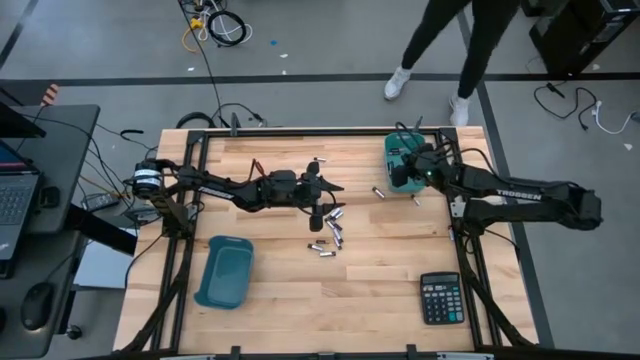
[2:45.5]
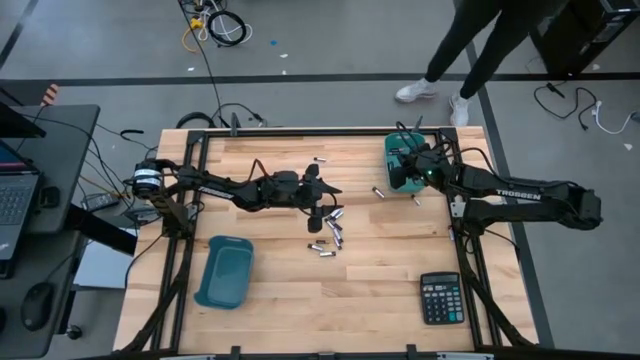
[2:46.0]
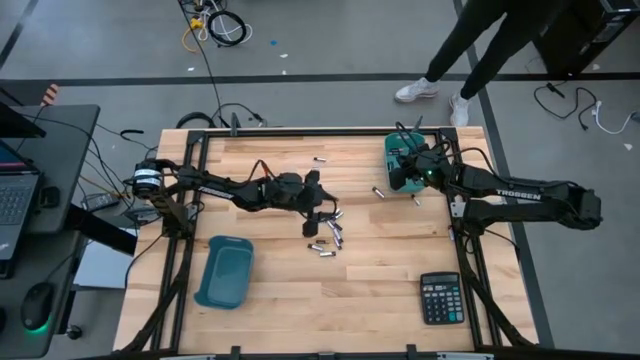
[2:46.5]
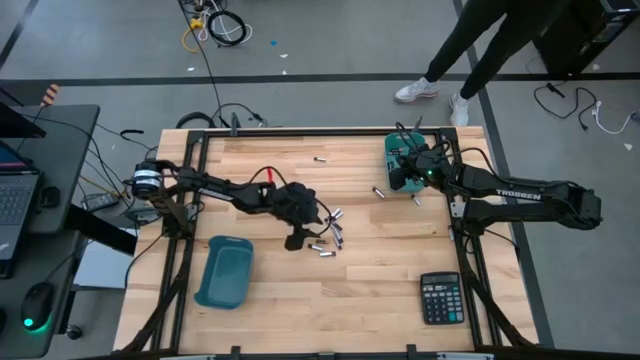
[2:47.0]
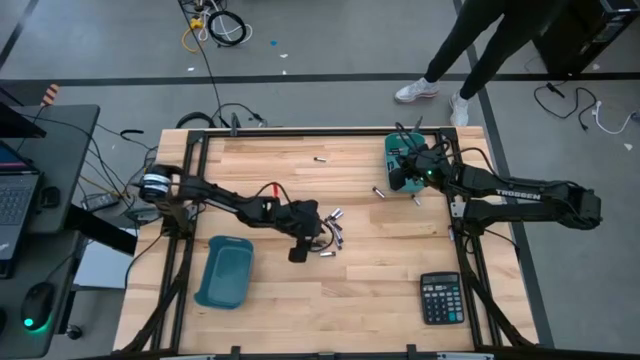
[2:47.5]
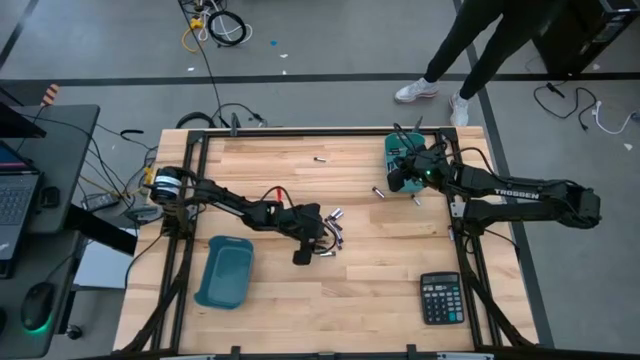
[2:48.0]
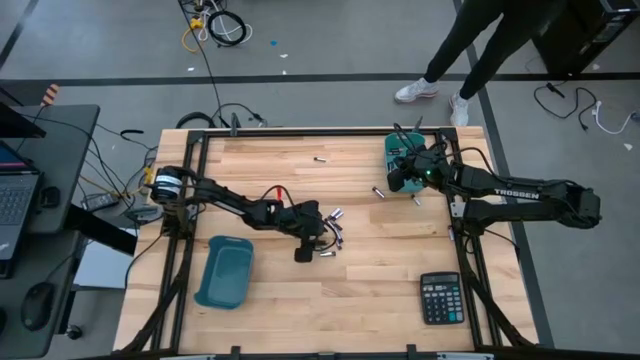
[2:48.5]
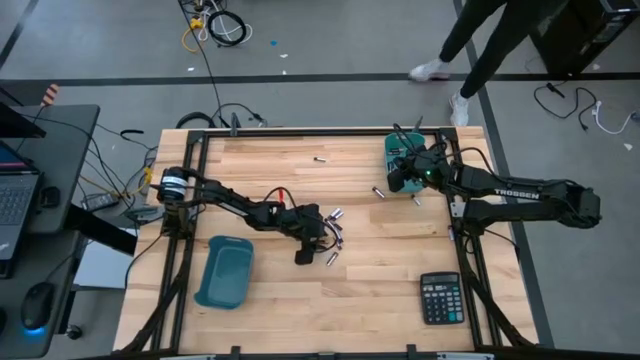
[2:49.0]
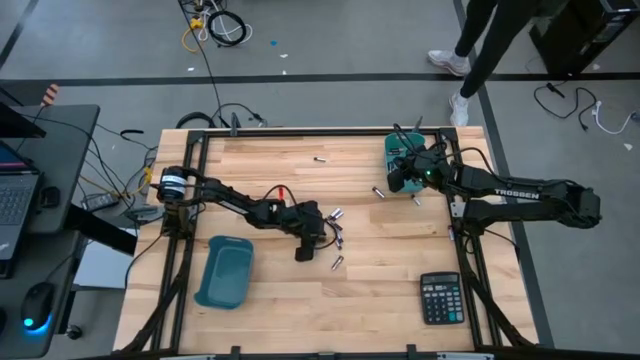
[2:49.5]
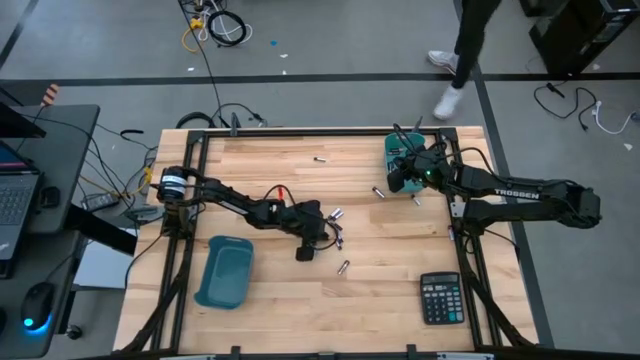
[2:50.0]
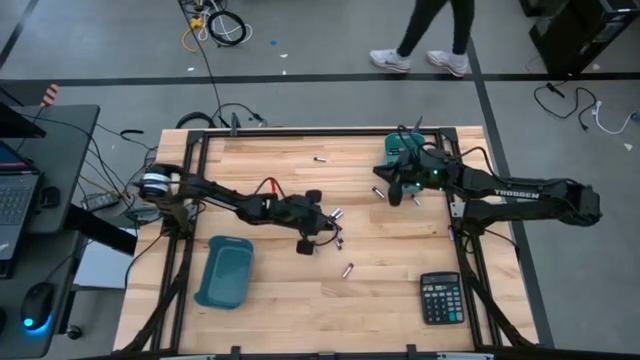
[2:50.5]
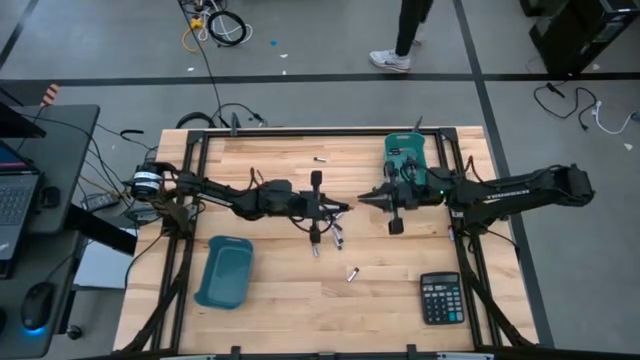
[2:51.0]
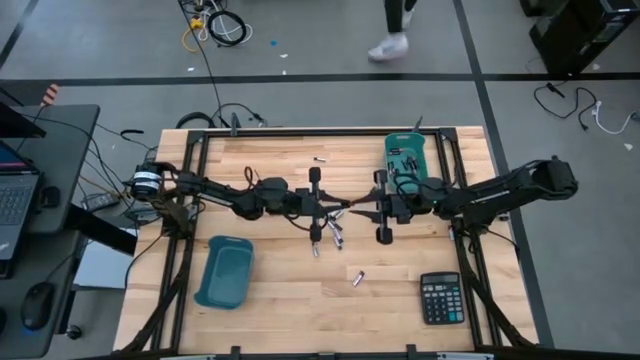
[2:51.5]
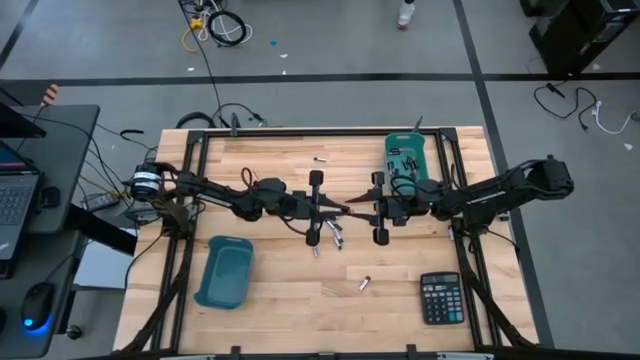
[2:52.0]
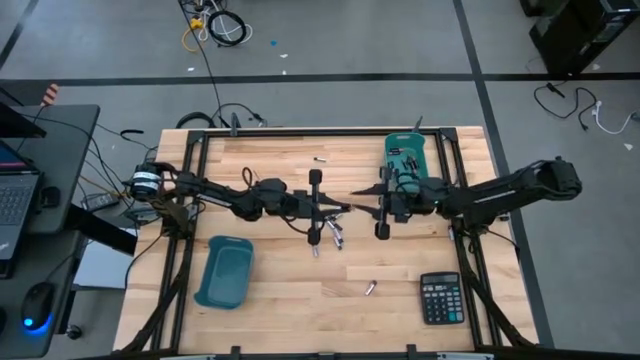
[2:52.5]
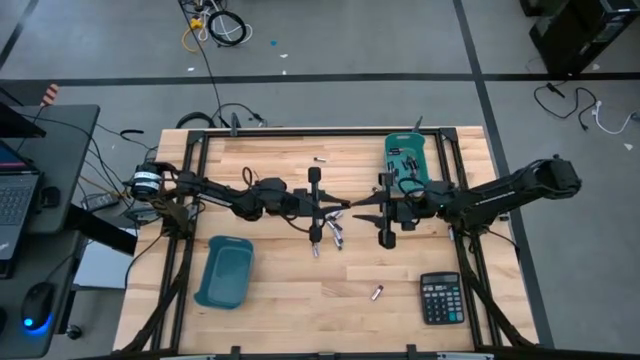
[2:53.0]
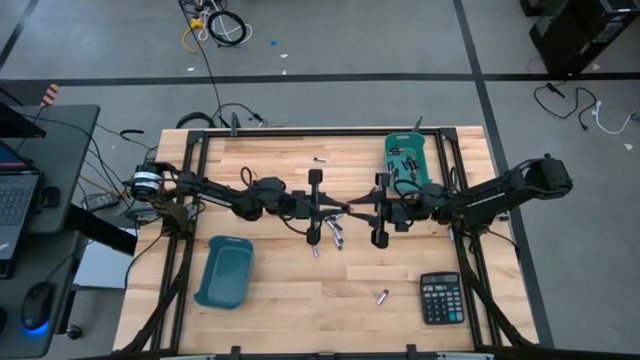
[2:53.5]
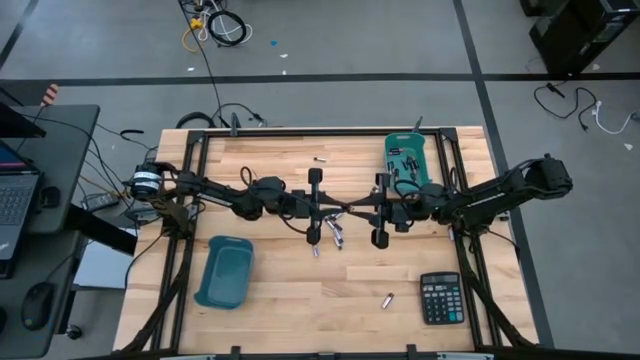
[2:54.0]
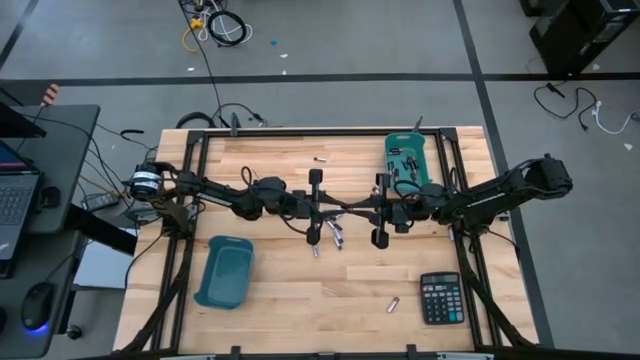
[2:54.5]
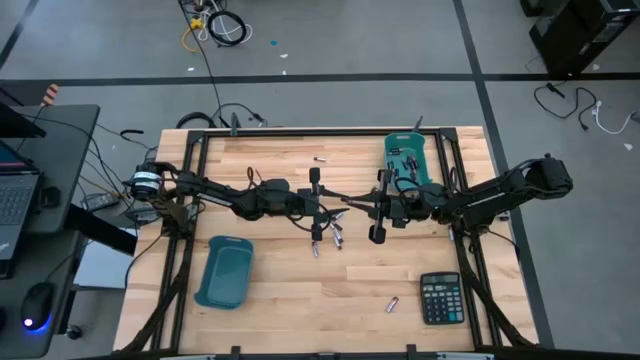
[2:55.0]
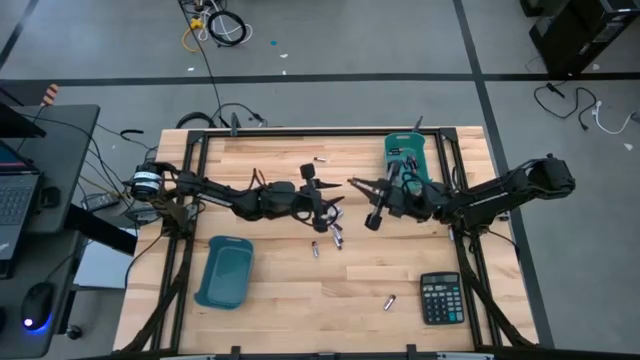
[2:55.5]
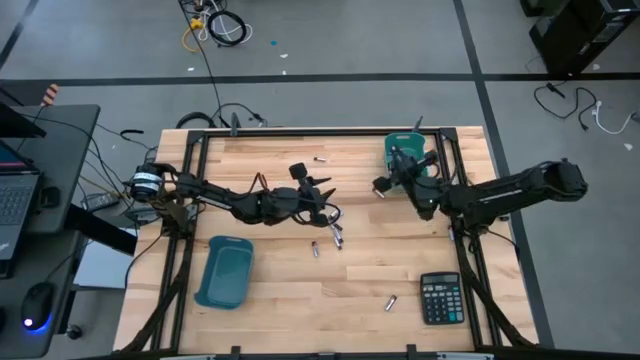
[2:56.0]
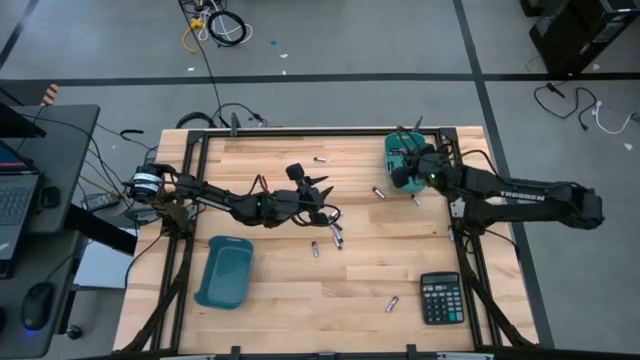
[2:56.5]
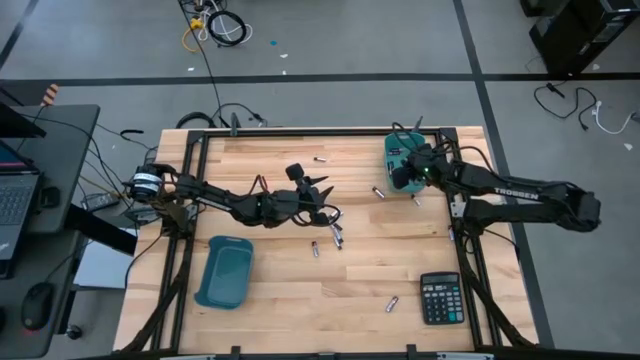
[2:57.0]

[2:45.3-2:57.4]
Task: Sort batteries
Put the black battery into the green bin

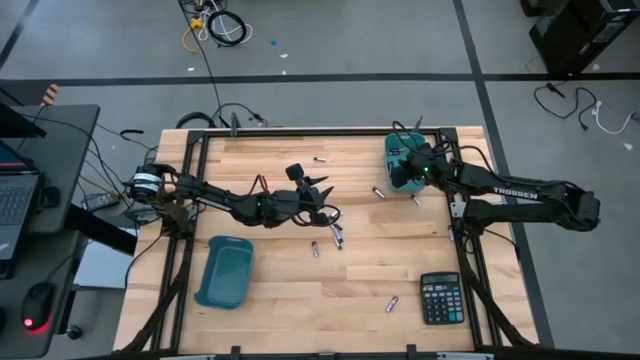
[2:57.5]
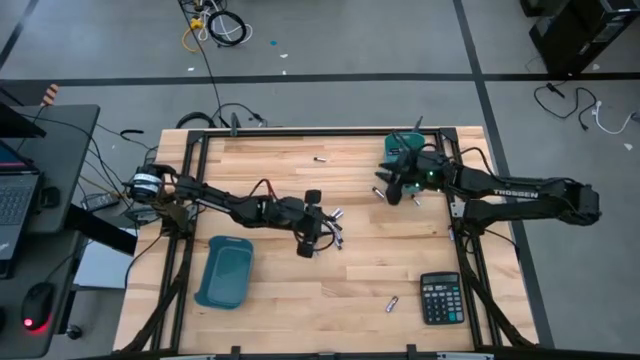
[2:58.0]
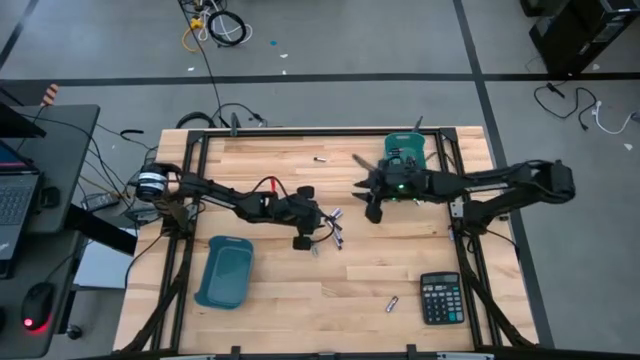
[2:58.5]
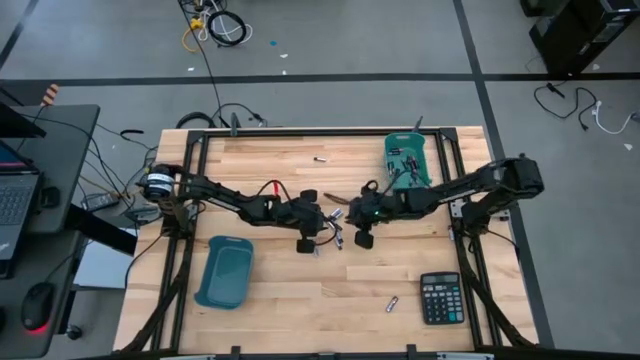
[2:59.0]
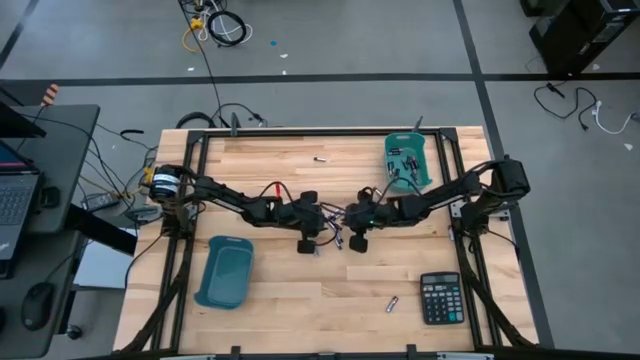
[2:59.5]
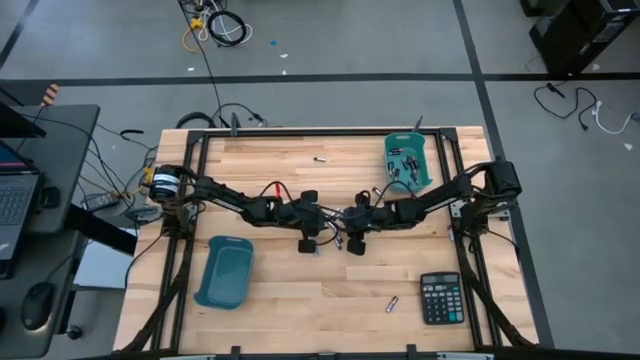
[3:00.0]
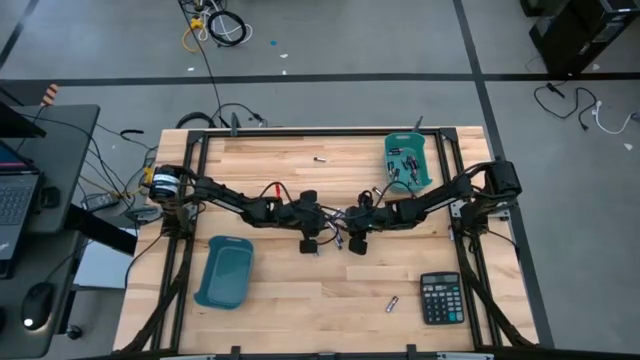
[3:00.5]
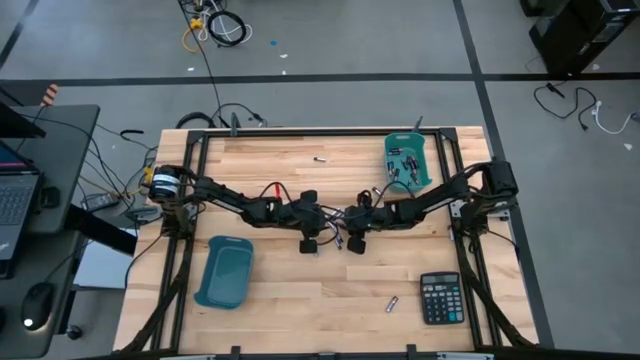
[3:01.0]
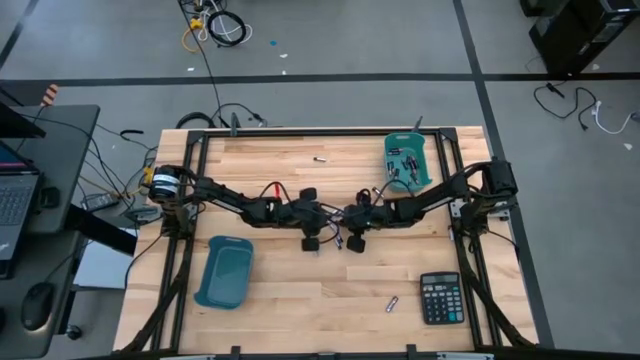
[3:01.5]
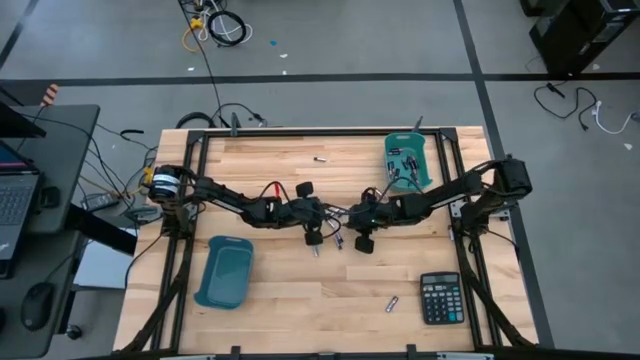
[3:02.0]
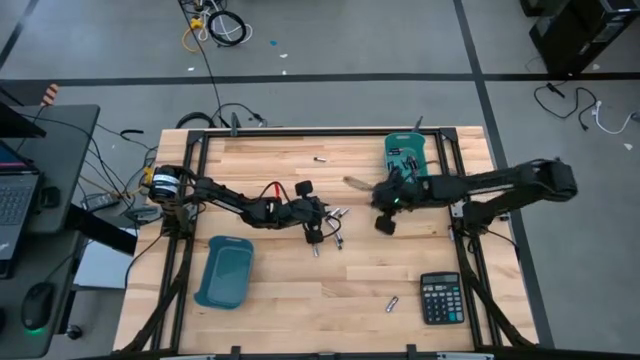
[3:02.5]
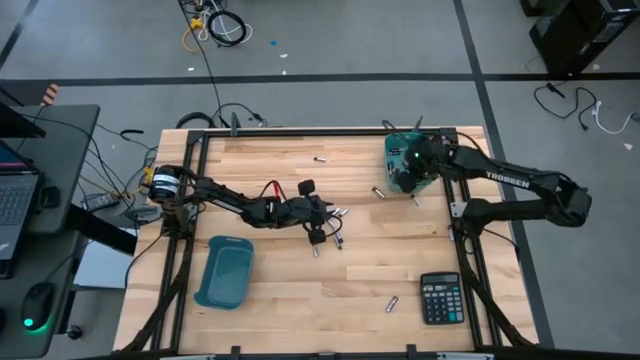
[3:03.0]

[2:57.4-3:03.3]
Put the black battery into the green bin

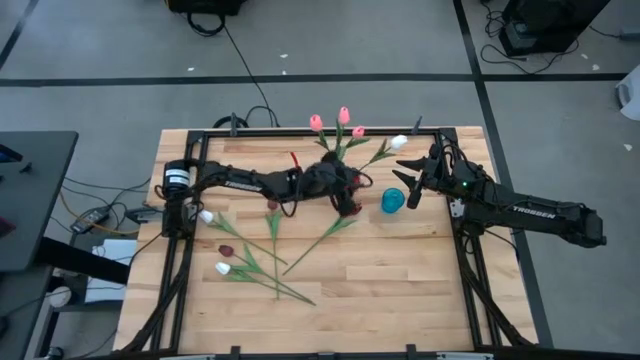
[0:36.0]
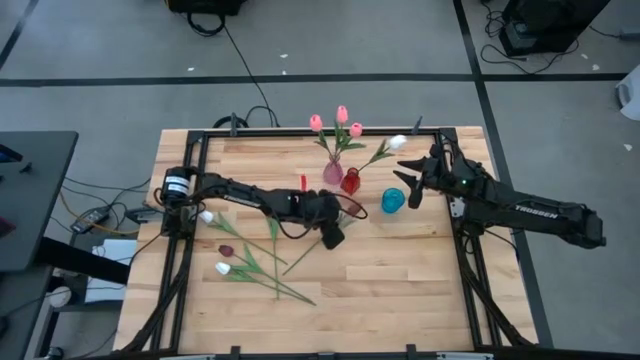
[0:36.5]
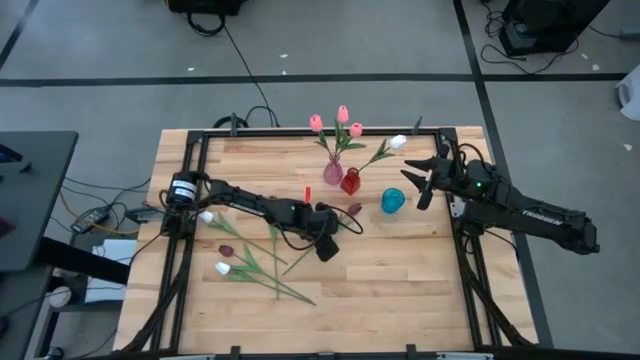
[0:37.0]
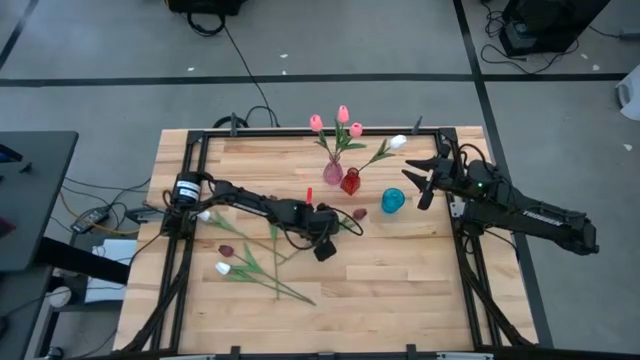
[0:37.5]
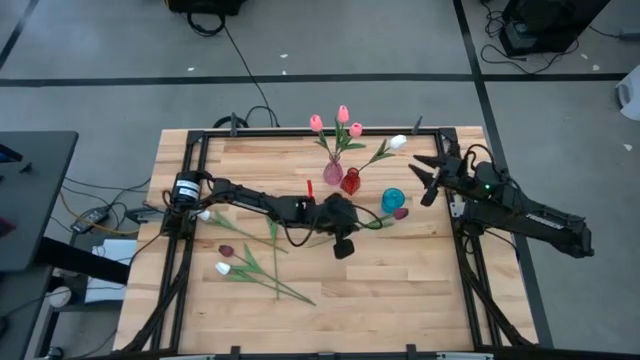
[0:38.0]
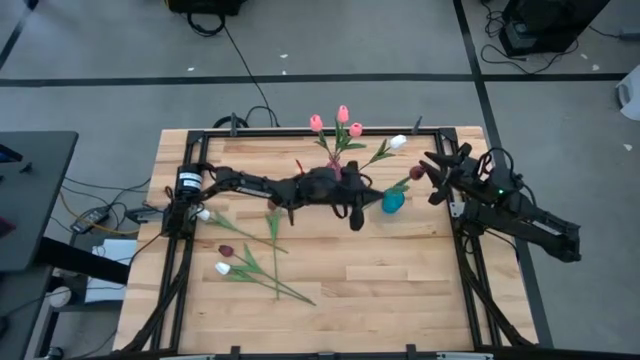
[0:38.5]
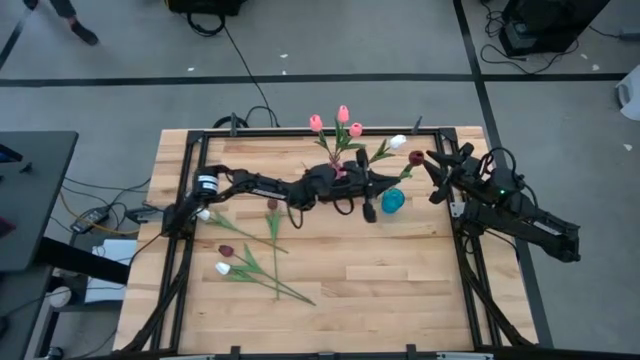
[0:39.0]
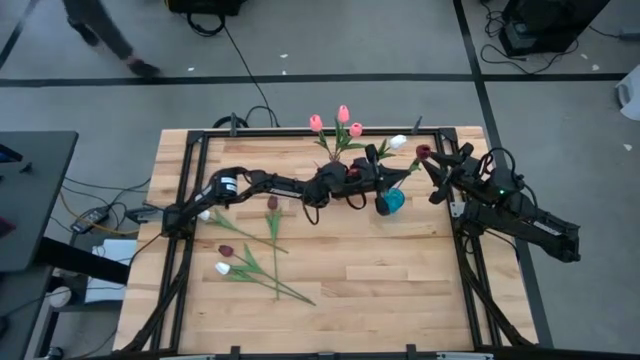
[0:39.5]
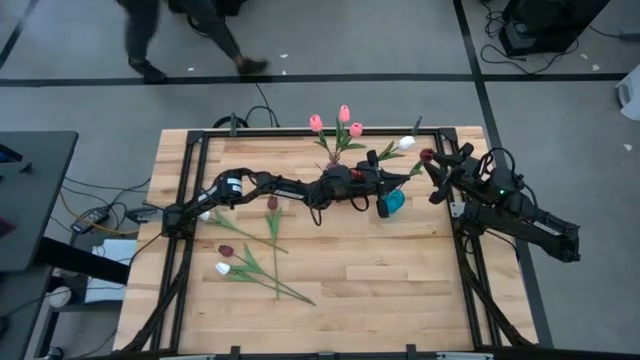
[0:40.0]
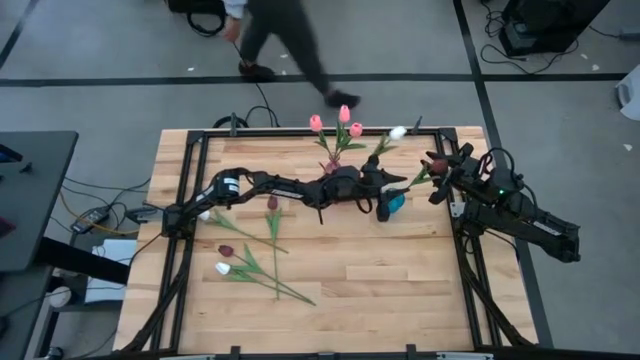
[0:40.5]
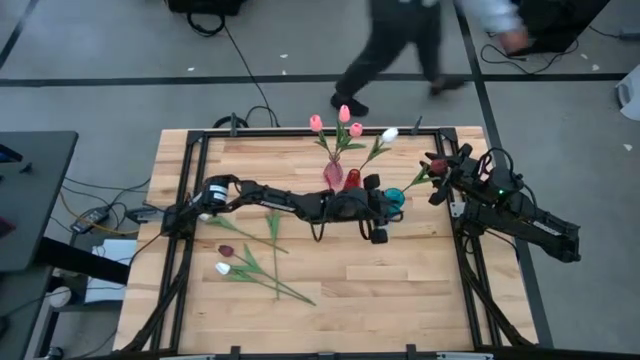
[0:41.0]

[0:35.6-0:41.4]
Task: Sort flowers into vase by color
Put the top right red flower into the blue vase
